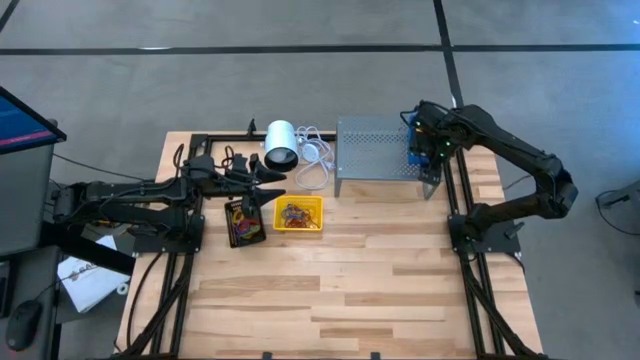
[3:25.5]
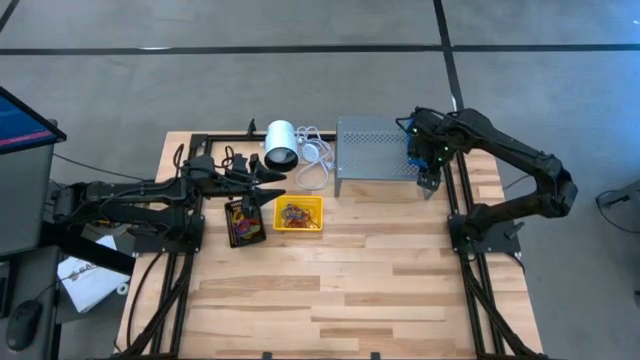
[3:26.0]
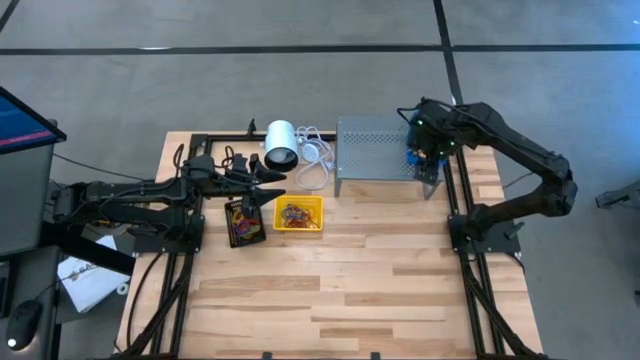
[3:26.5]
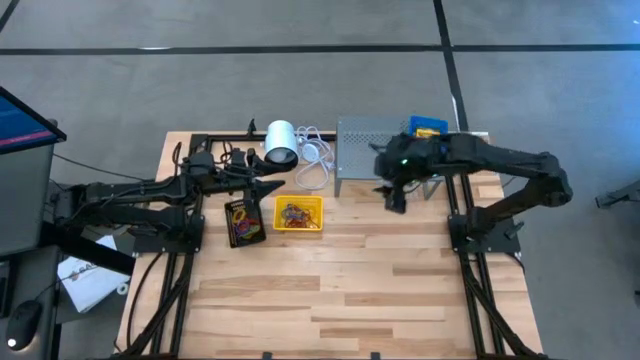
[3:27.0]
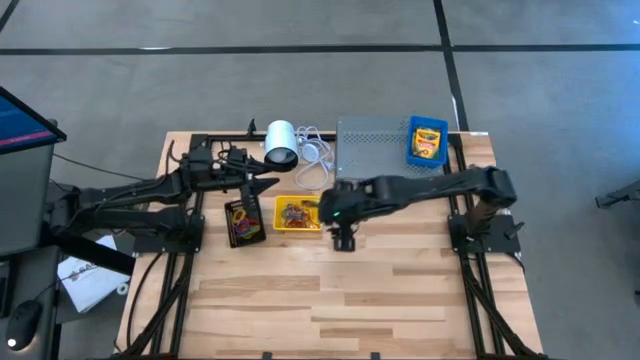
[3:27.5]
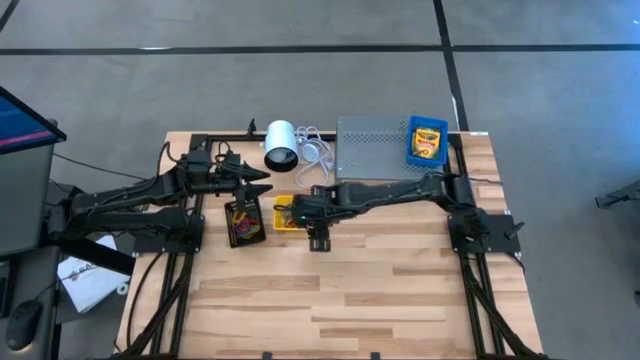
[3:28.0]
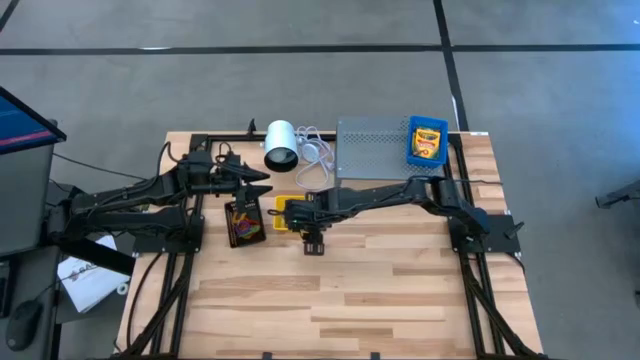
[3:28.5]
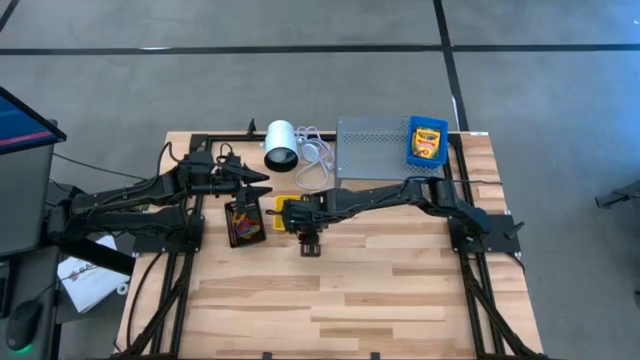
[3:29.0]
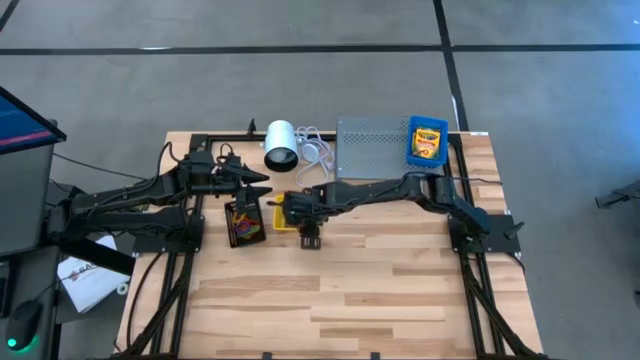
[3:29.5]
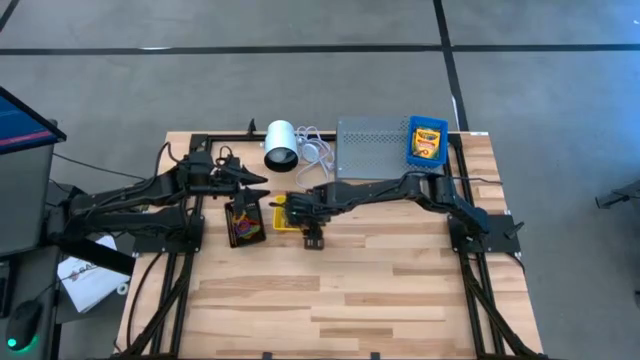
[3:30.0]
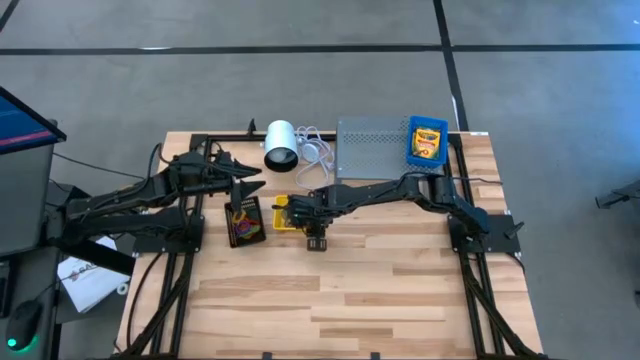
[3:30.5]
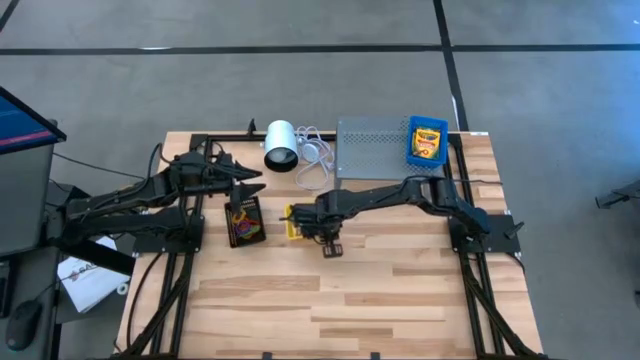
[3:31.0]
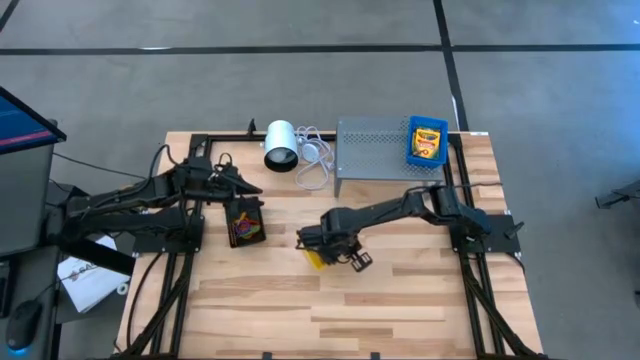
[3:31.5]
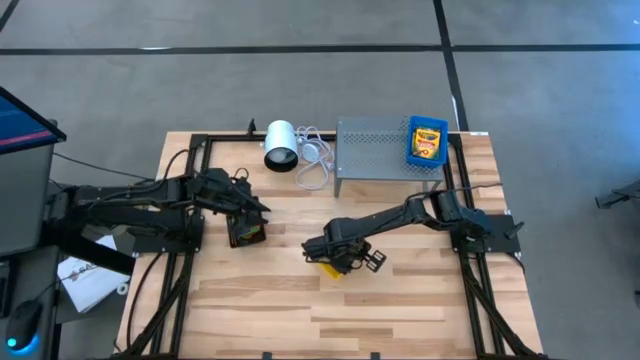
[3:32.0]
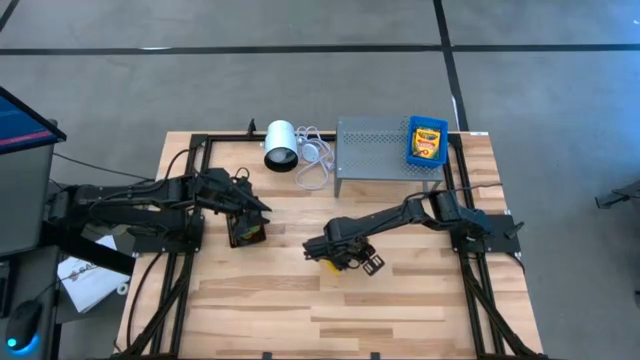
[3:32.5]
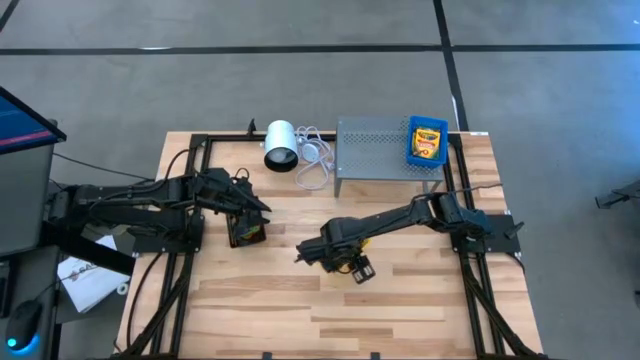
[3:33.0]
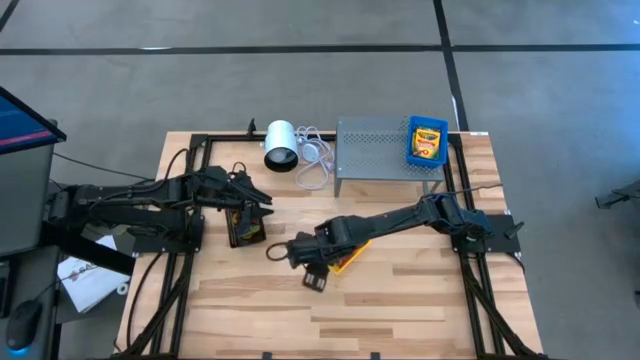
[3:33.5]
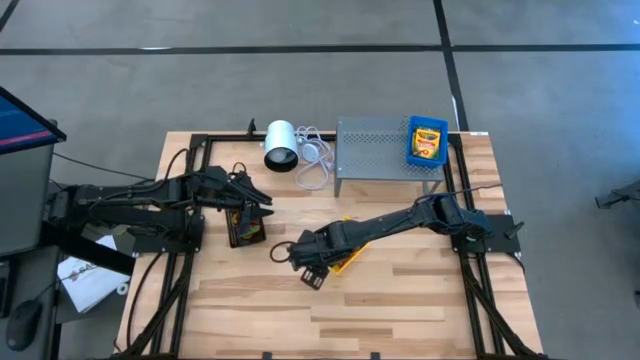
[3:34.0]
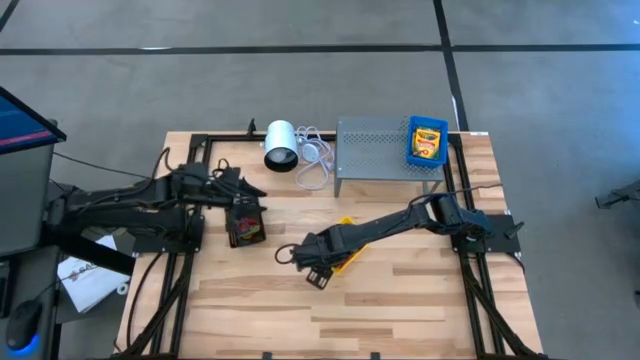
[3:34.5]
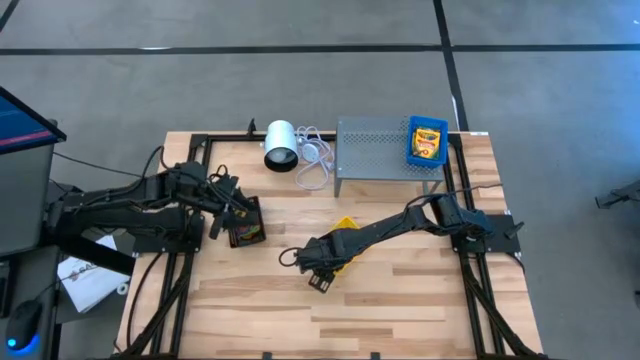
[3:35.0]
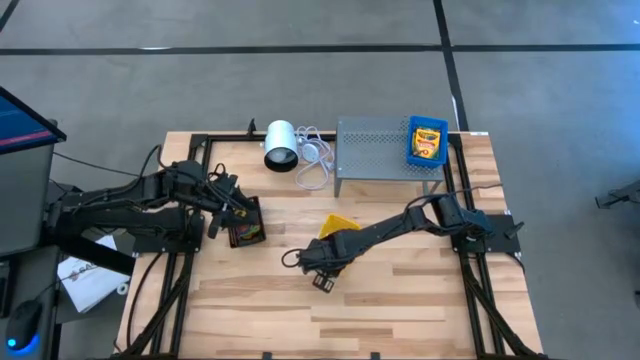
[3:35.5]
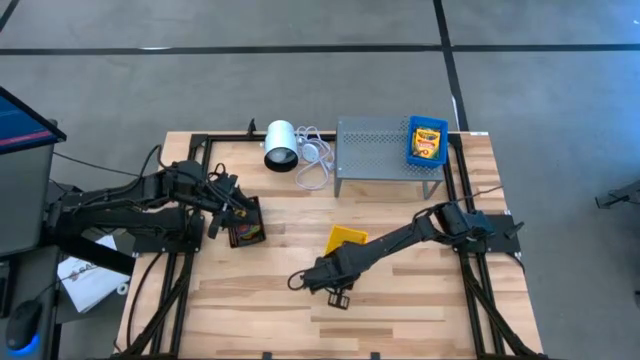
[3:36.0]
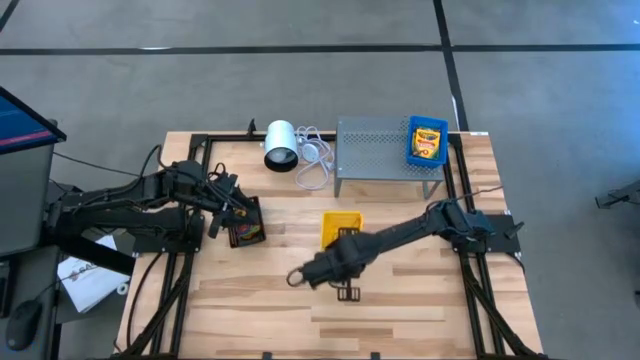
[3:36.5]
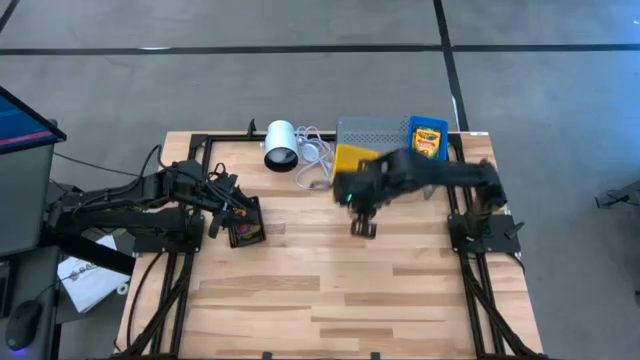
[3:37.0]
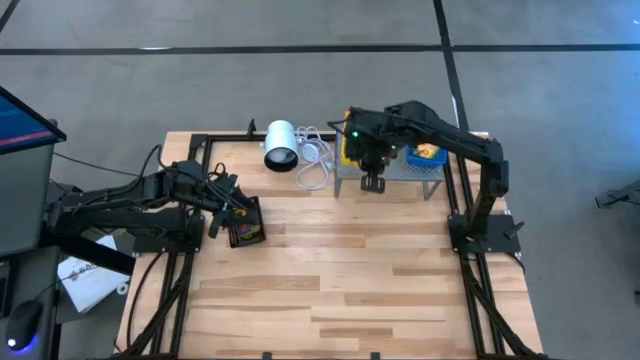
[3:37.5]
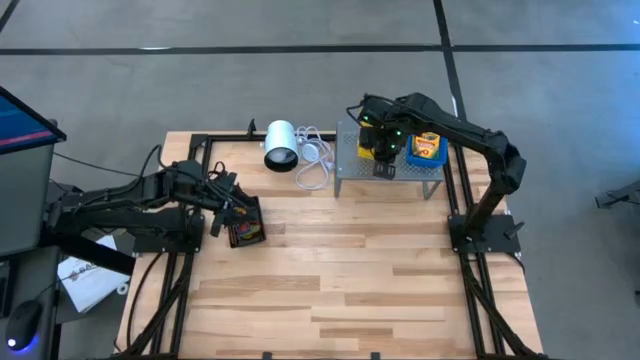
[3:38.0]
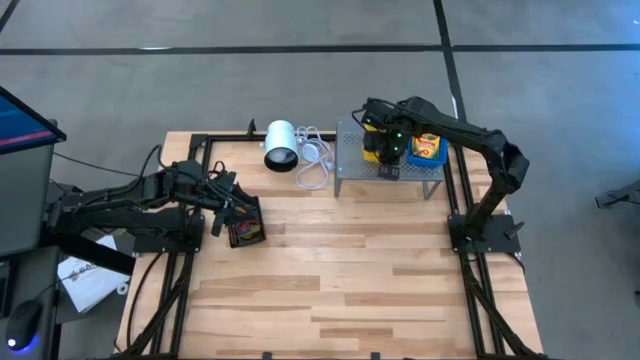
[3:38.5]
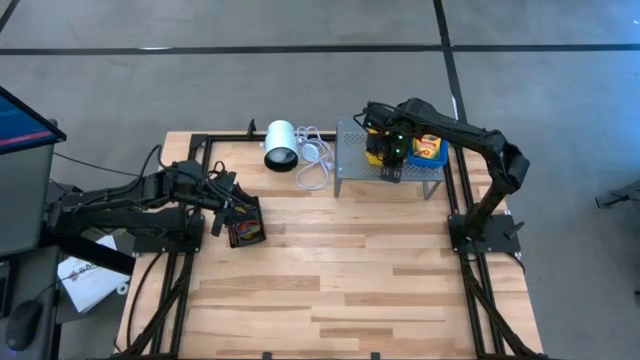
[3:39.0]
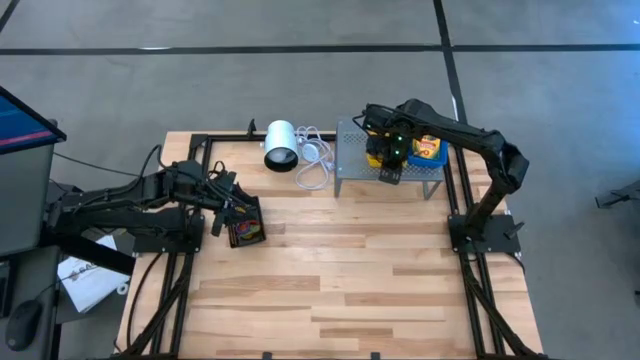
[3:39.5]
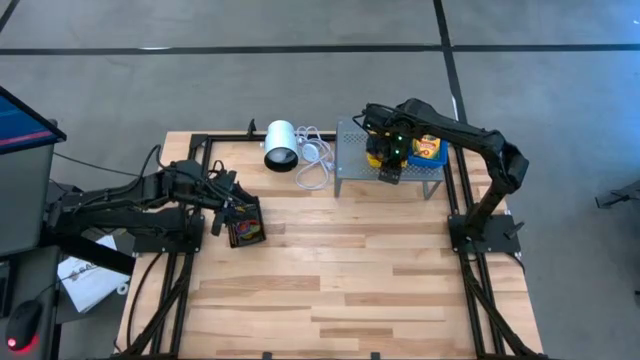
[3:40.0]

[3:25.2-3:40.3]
Task: Pick & Place Office Desk Supplies
Put the yellow bin on the shelf

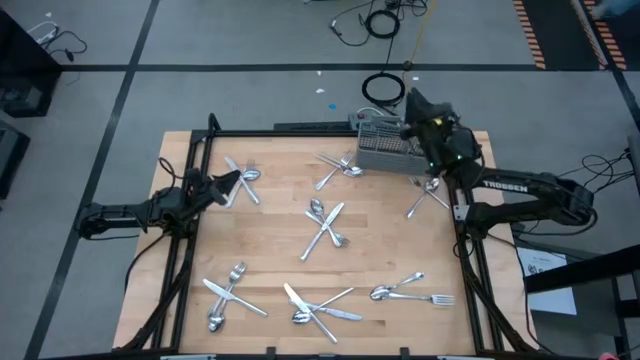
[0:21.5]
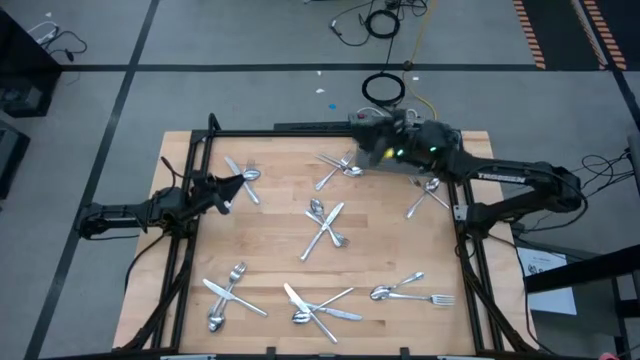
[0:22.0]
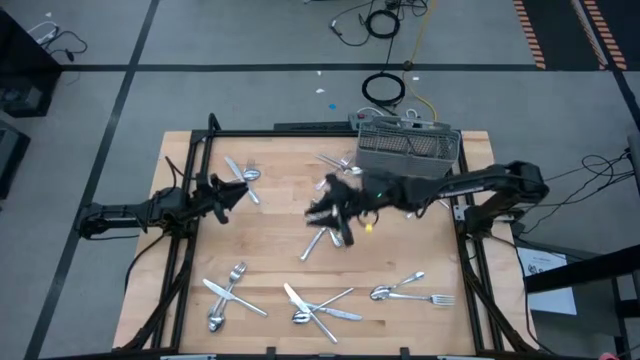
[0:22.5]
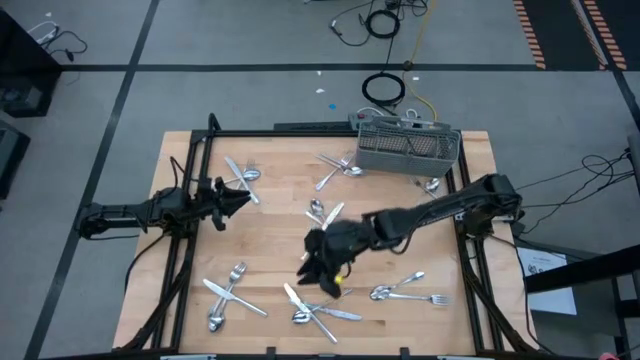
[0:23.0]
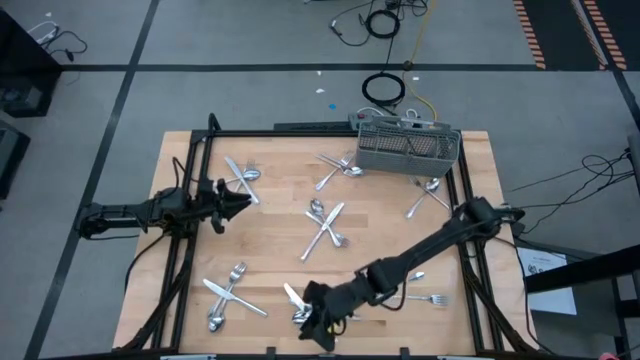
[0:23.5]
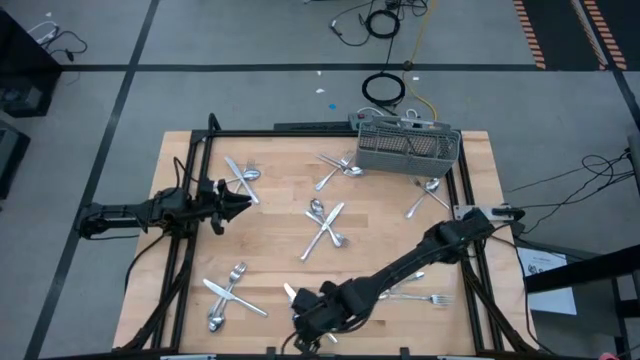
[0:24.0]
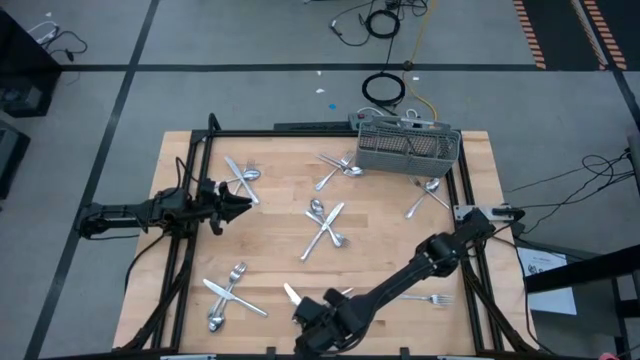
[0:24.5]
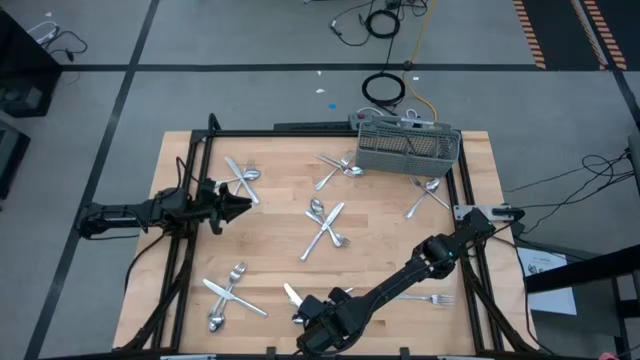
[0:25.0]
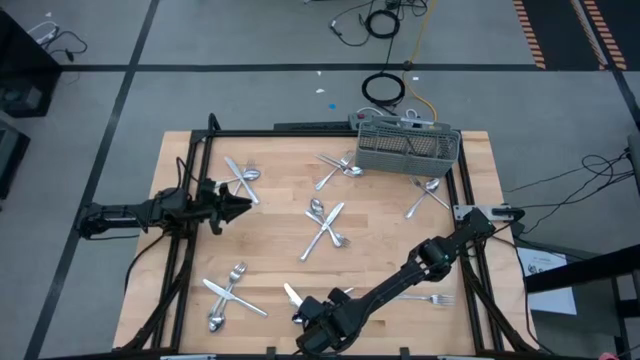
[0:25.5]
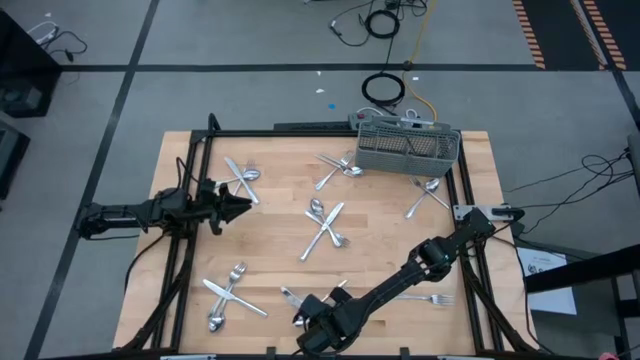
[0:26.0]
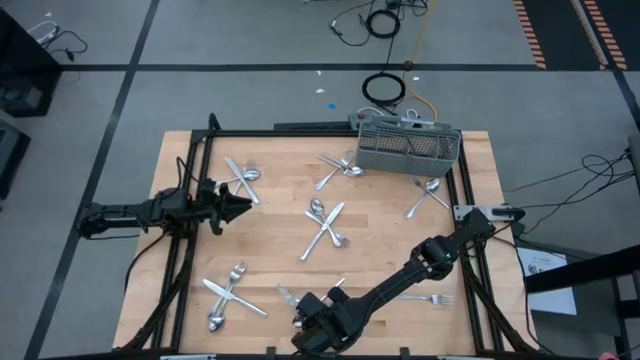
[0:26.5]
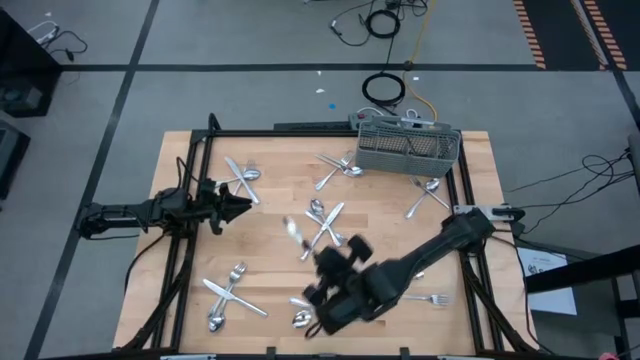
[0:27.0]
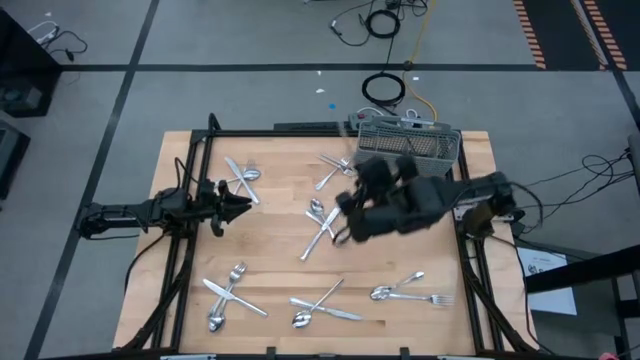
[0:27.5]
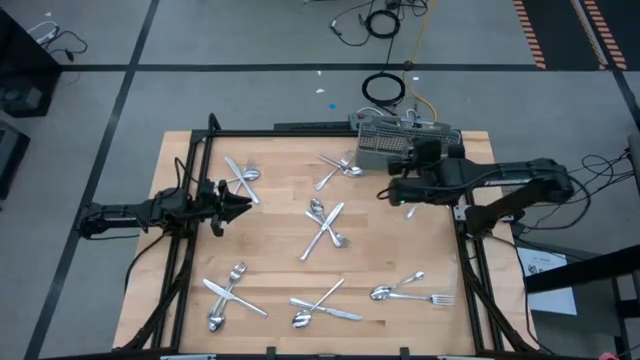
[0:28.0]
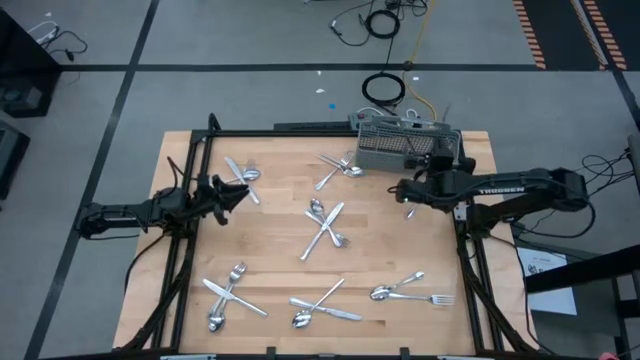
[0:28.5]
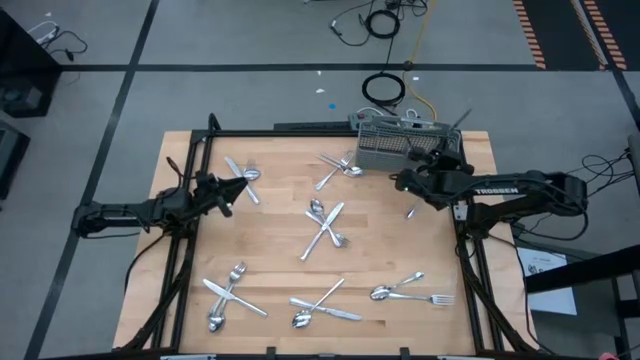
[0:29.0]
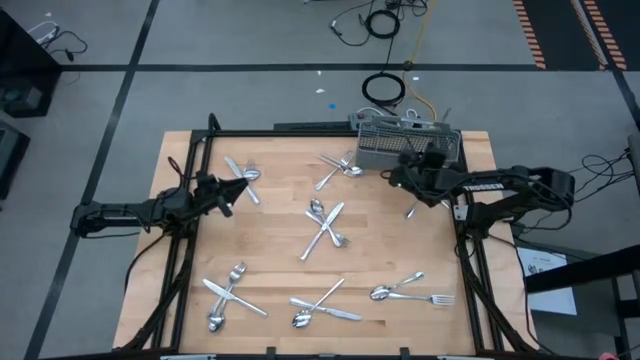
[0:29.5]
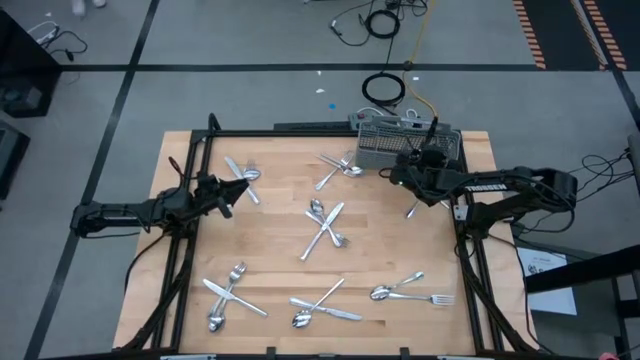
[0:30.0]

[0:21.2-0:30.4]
Task: Sort silverware
Put the silver table knife into the gray utensil holder
